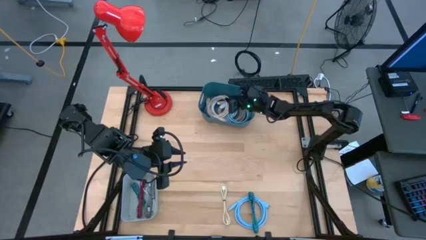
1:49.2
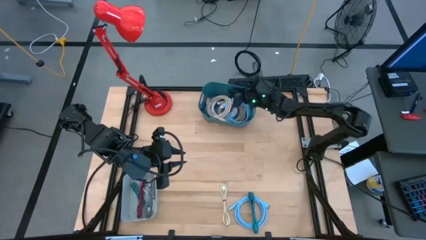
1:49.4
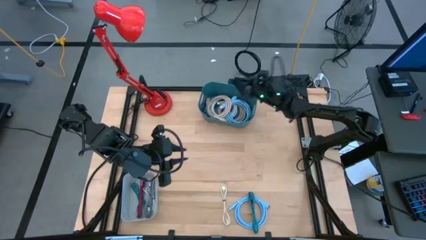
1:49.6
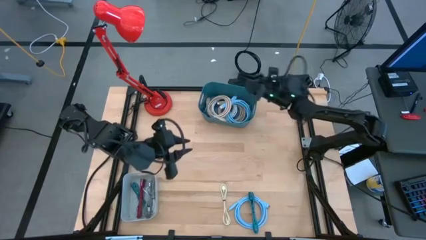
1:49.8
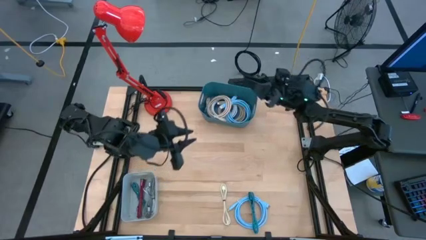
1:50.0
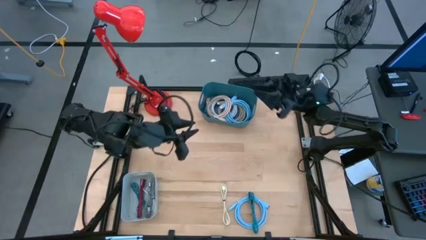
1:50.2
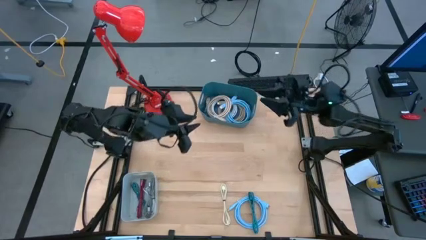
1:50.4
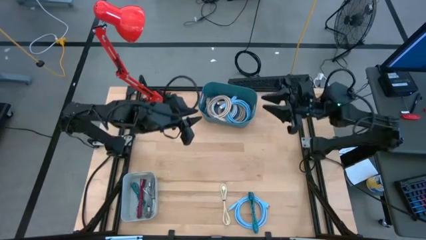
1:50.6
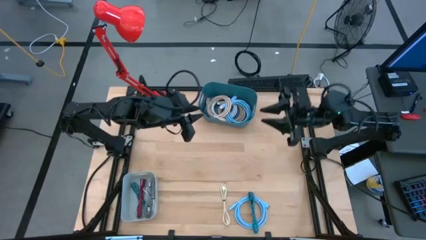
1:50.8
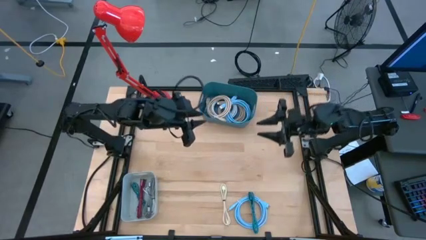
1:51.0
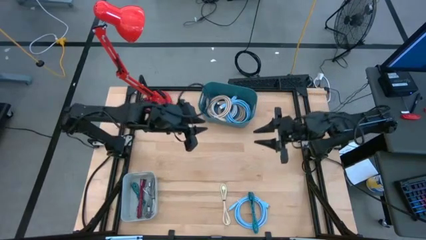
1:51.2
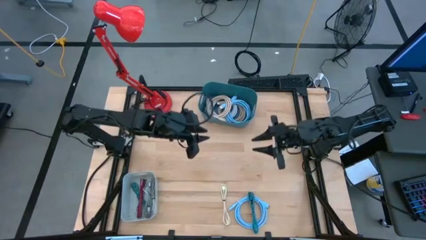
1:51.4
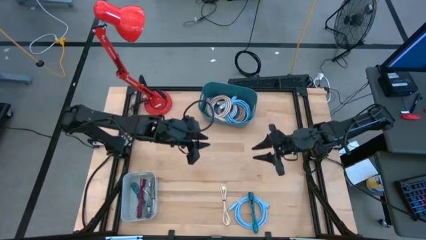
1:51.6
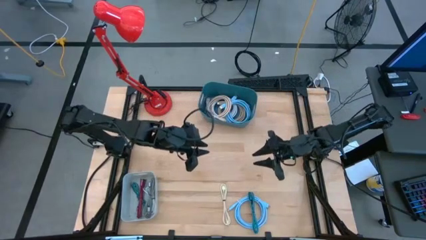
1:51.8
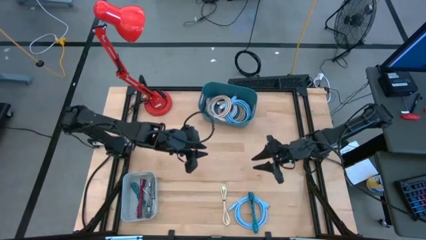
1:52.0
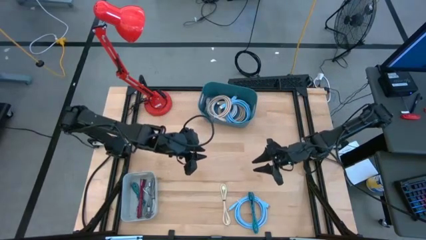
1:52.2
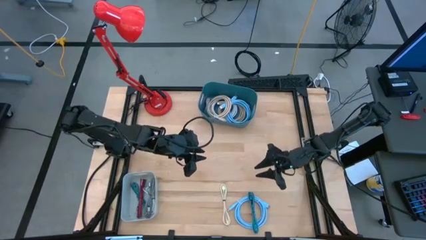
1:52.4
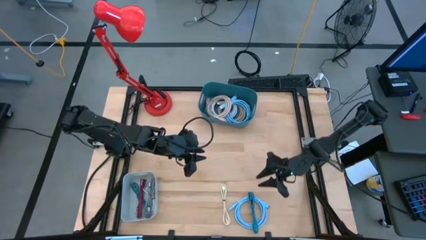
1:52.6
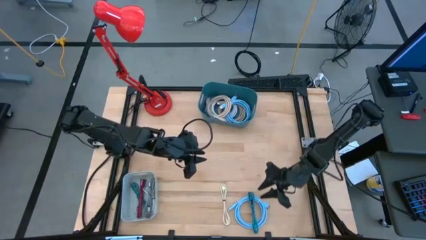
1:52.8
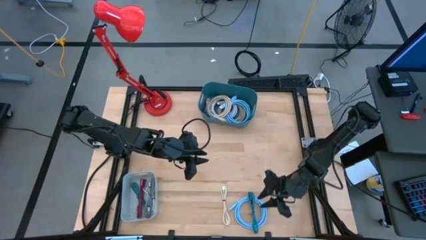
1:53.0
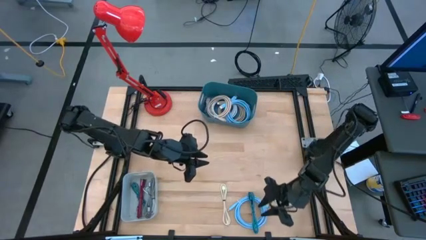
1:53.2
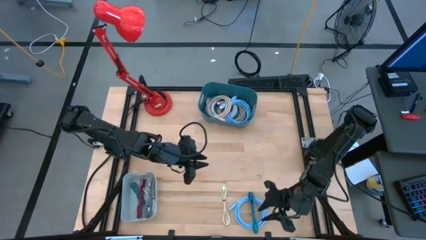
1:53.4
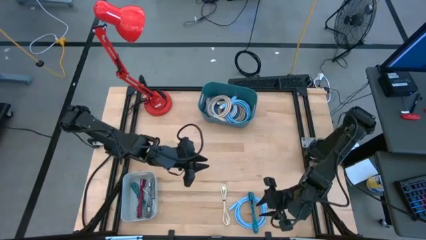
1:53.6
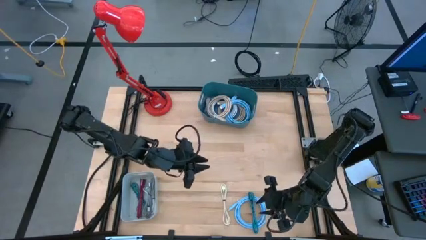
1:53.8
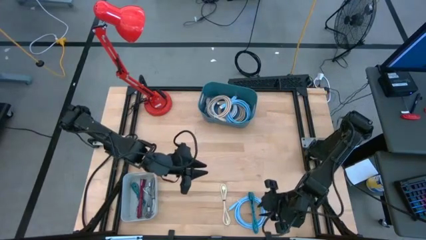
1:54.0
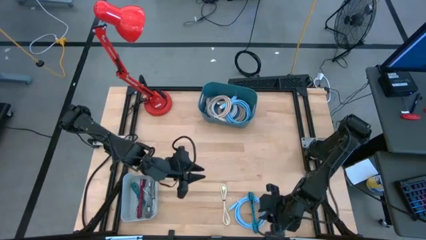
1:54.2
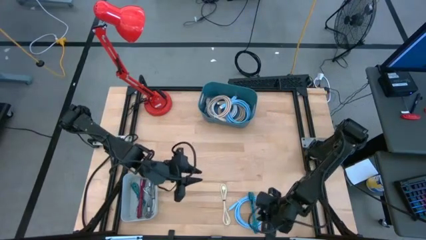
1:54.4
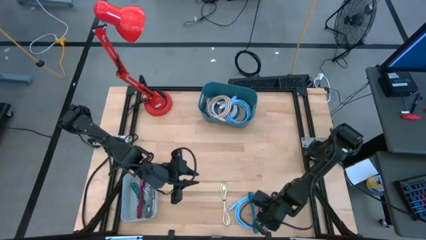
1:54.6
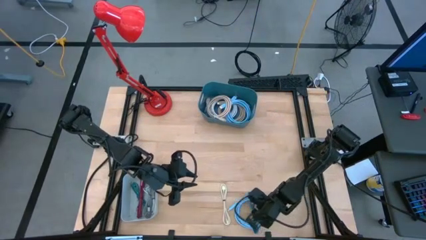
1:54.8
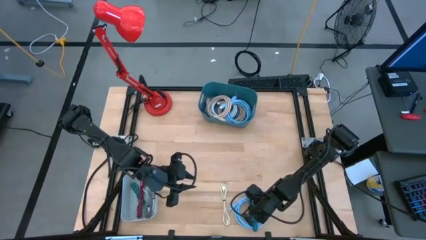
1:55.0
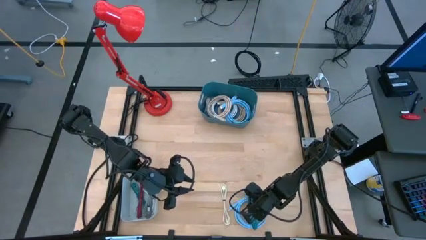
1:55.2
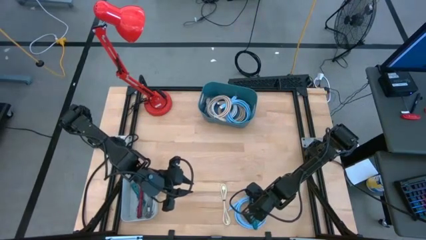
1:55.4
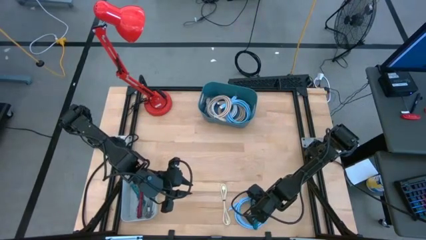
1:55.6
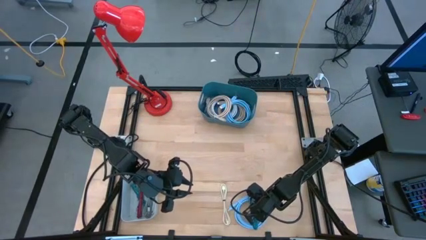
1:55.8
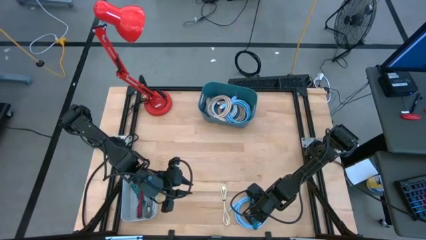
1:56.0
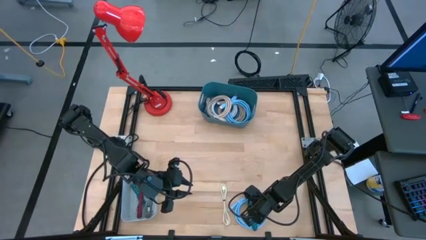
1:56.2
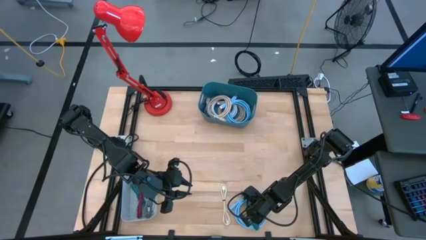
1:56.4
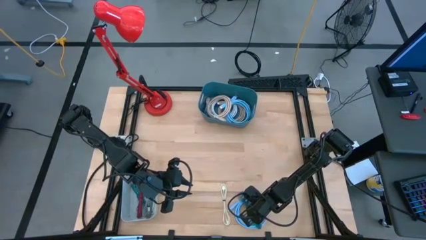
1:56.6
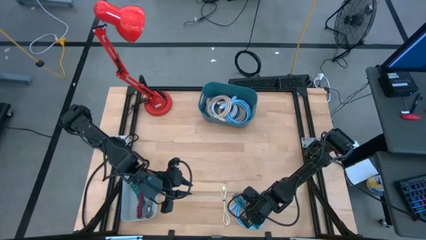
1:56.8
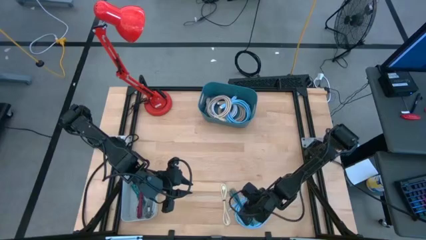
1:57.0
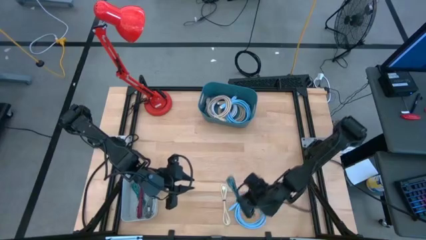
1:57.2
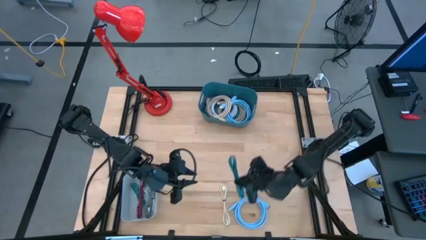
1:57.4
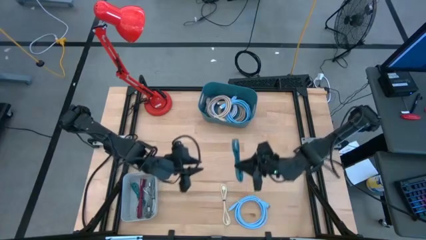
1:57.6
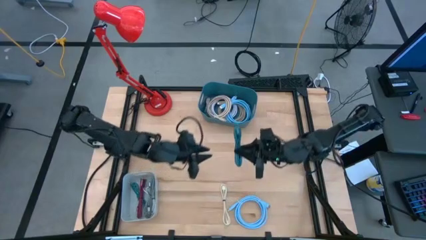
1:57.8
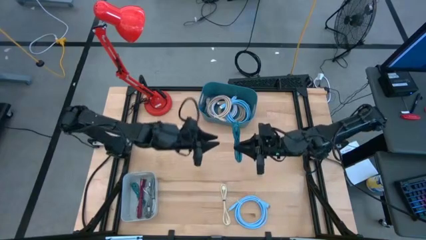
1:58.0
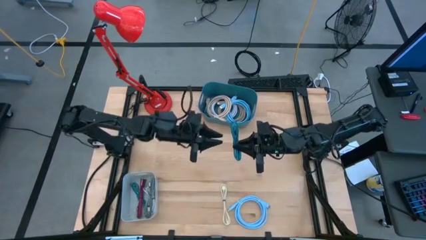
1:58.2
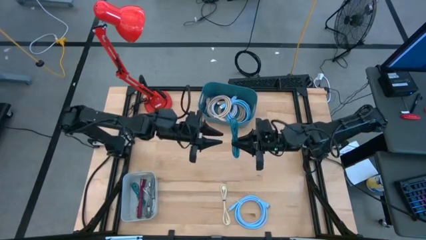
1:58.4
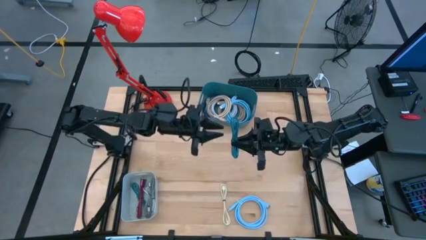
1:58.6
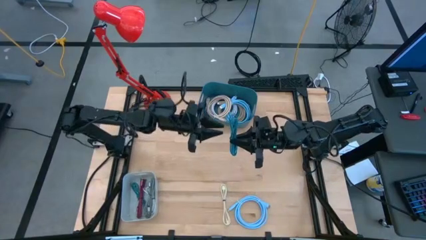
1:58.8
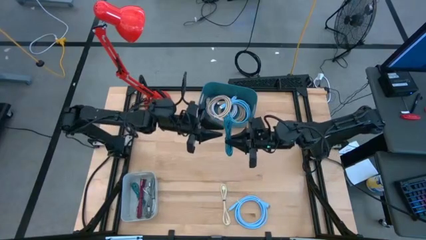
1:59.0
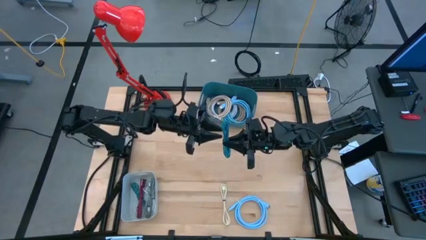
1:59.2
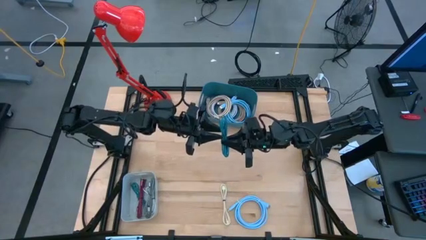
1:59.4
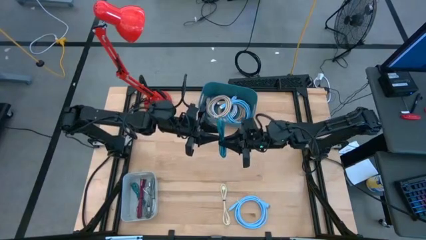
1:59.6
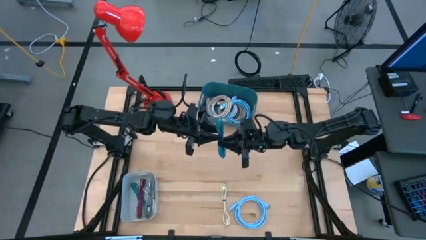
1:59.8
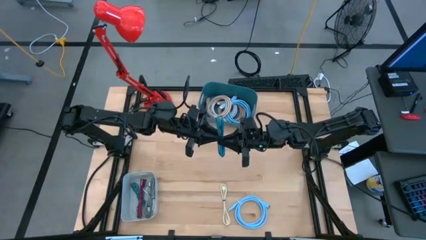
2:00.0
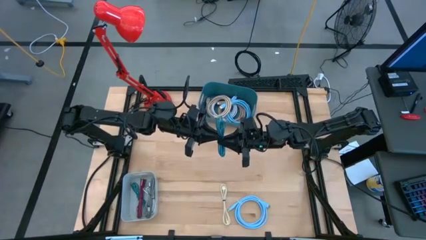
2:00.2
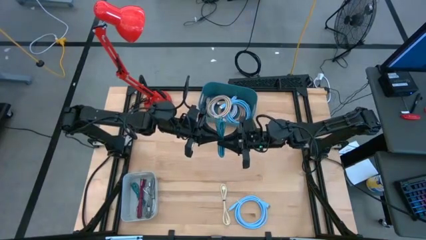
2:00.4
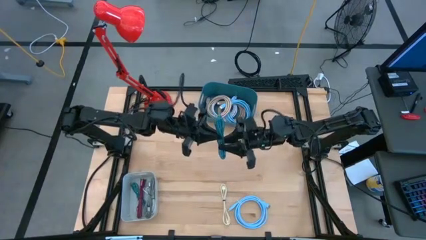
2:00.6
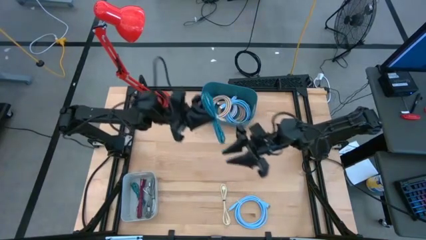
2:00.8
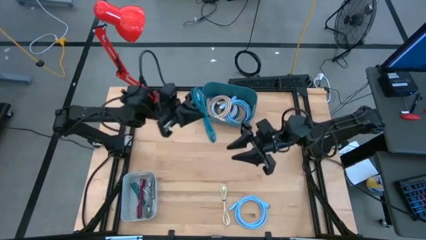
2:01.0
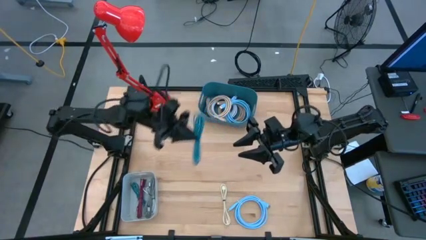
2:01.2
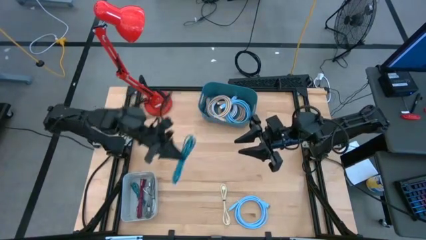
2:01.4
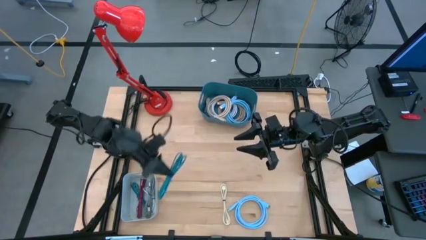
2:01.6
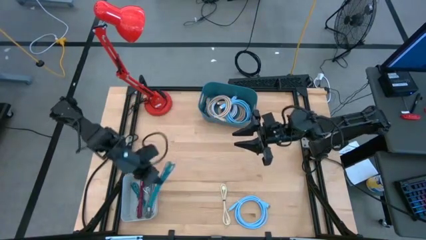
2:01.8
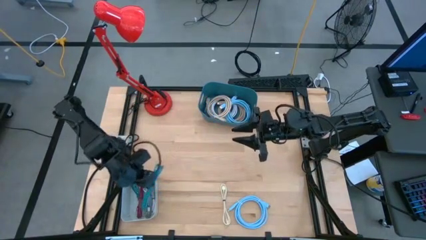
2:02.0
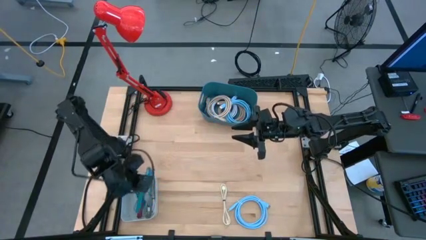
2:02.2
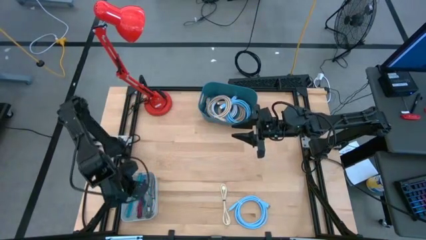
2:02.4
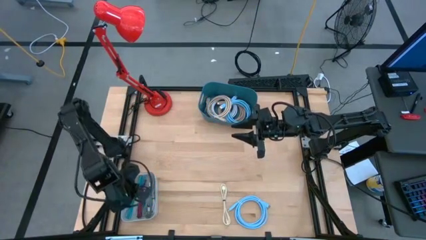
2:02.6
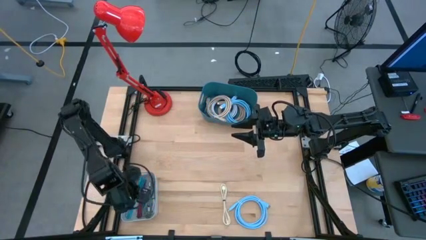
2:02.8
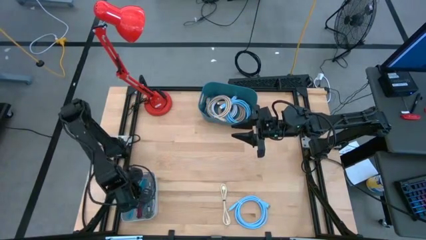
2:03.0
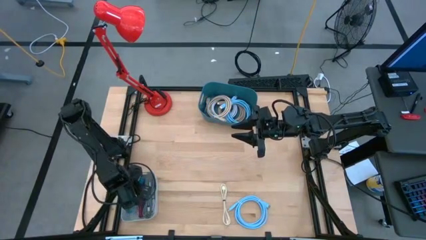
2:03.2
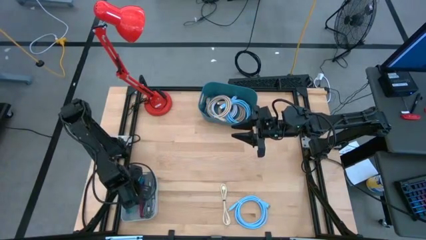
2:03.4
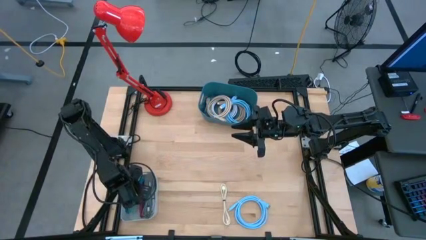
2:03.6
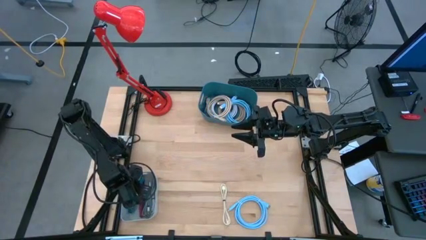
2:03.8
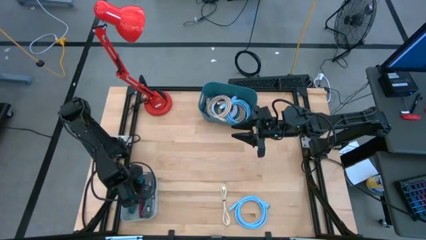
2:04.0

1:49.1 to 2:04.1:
Task: Pick & Place USB Port
Put the blue black charger cable into the gray bin
